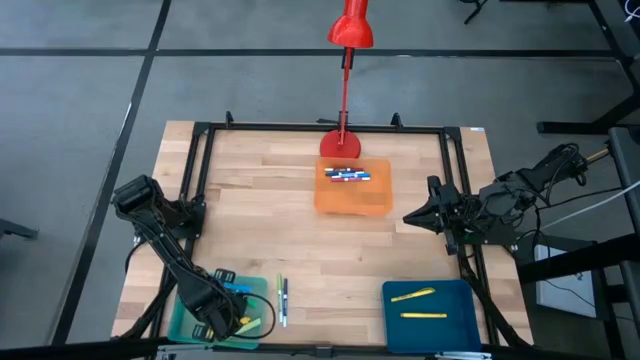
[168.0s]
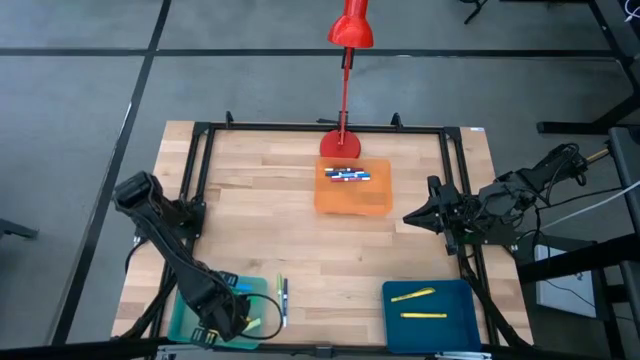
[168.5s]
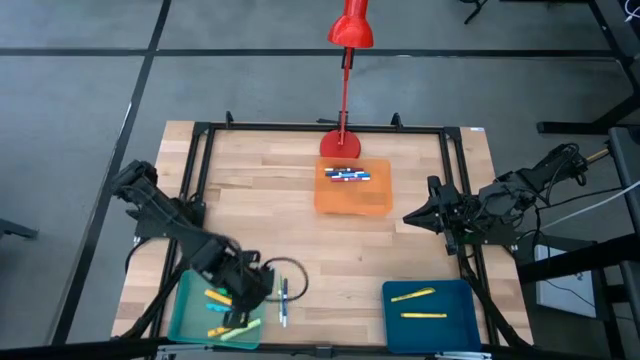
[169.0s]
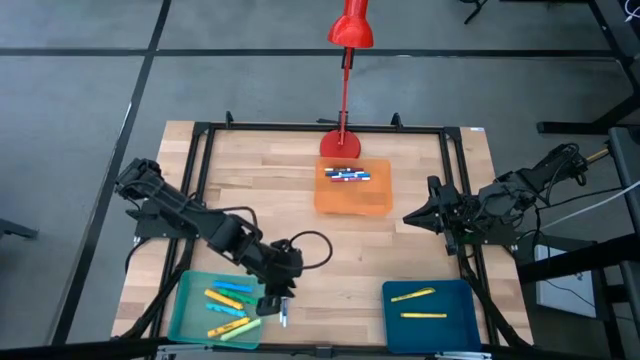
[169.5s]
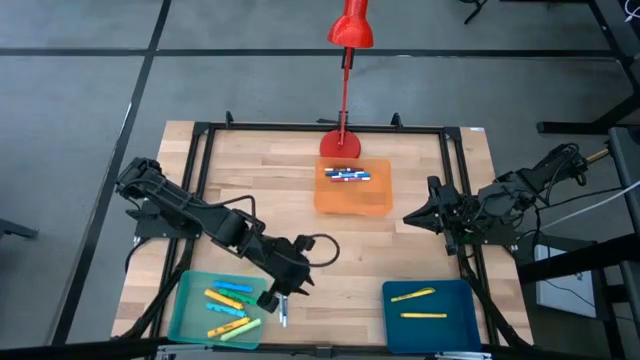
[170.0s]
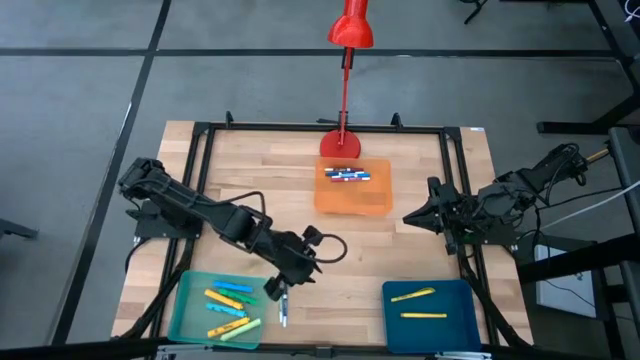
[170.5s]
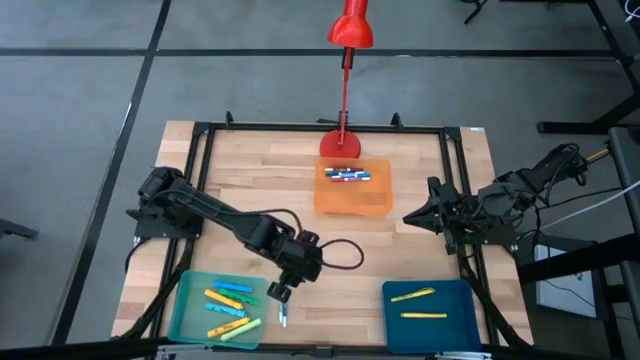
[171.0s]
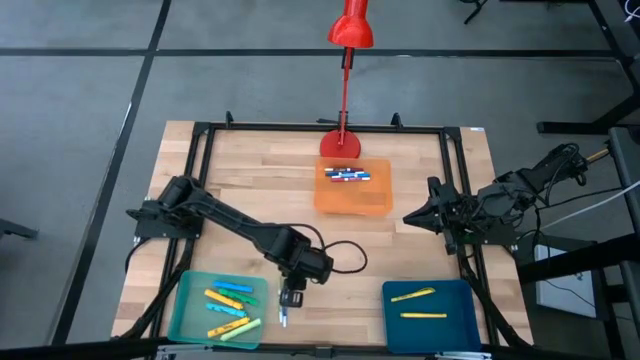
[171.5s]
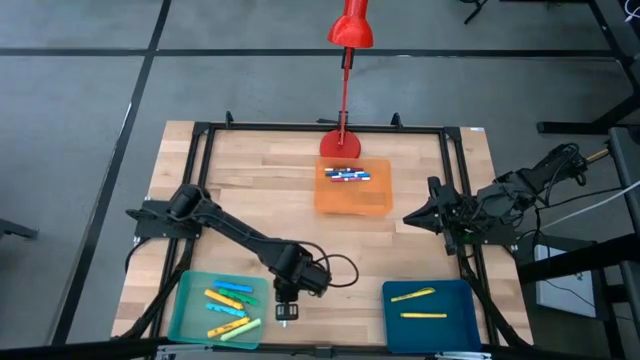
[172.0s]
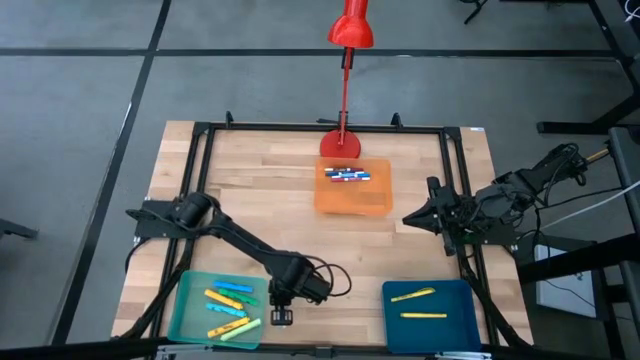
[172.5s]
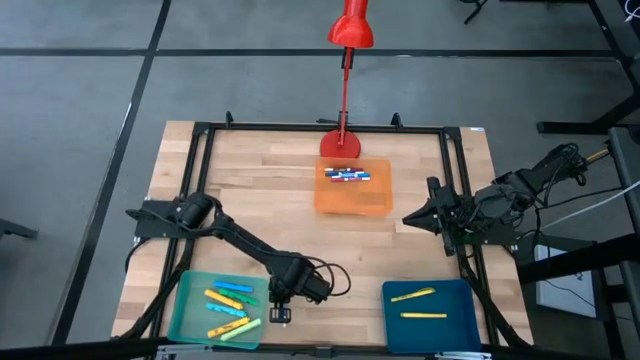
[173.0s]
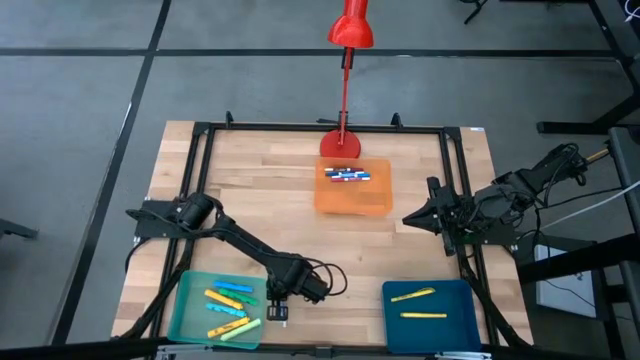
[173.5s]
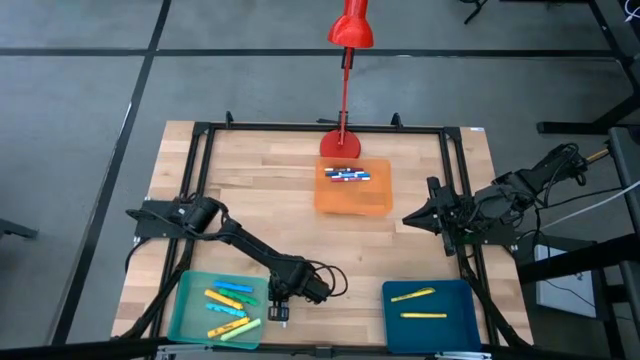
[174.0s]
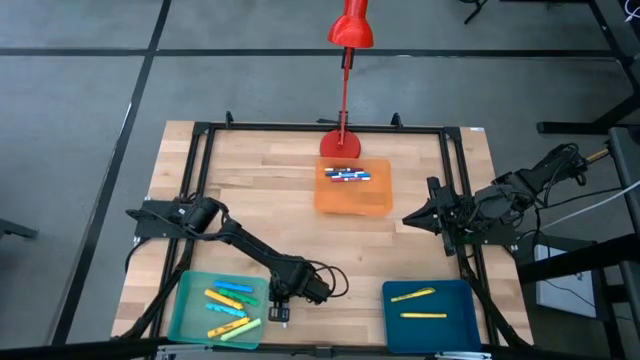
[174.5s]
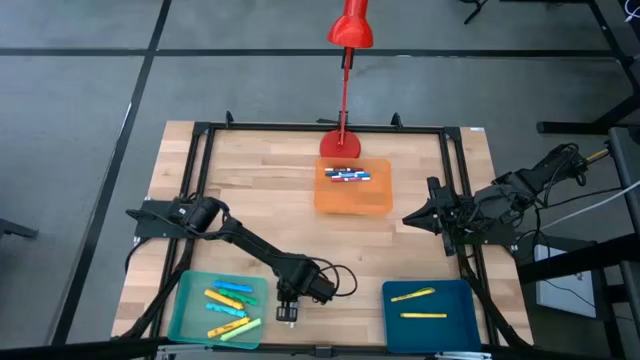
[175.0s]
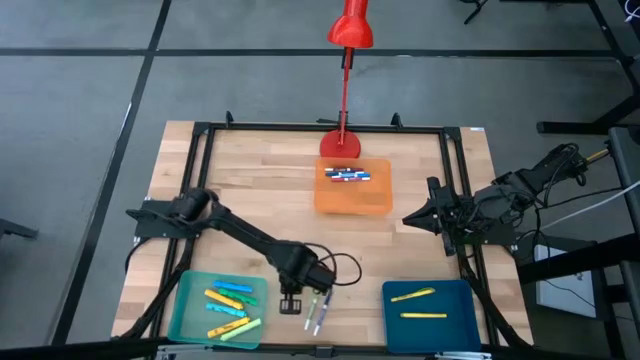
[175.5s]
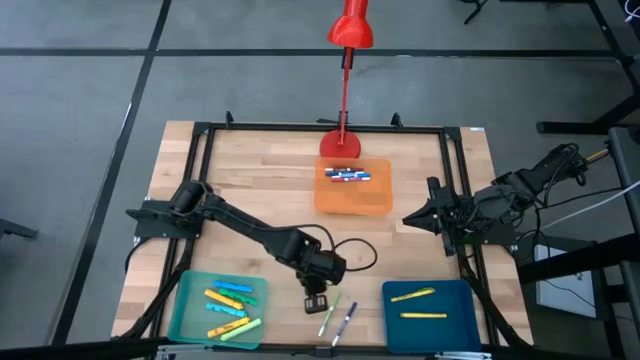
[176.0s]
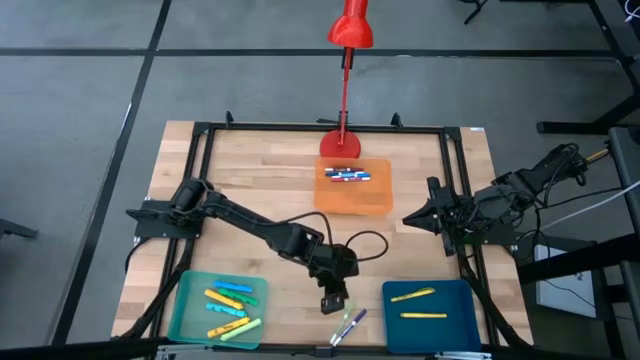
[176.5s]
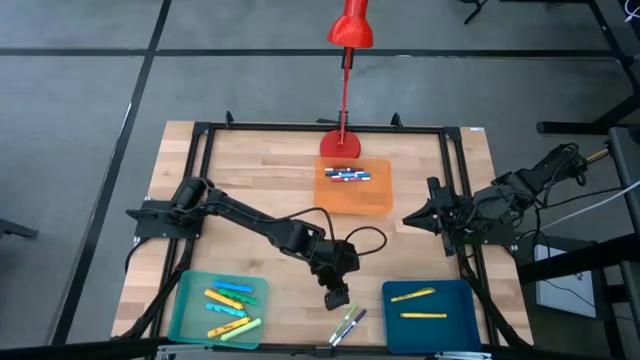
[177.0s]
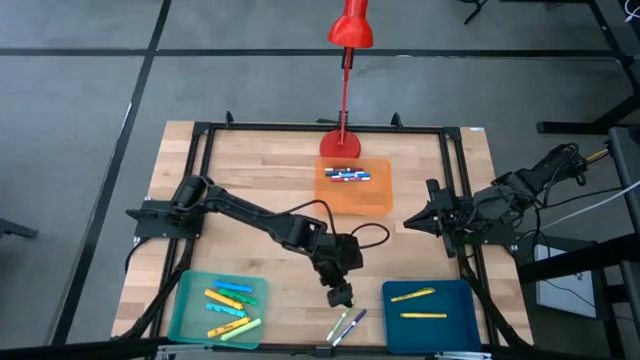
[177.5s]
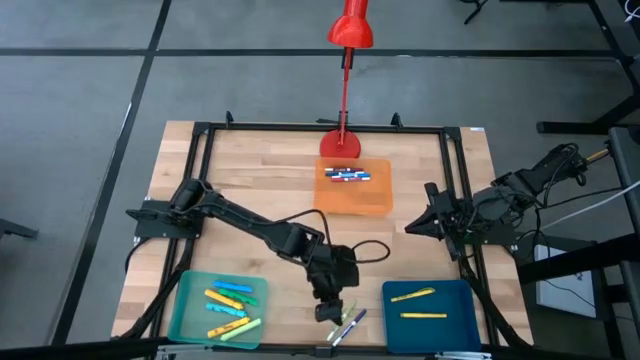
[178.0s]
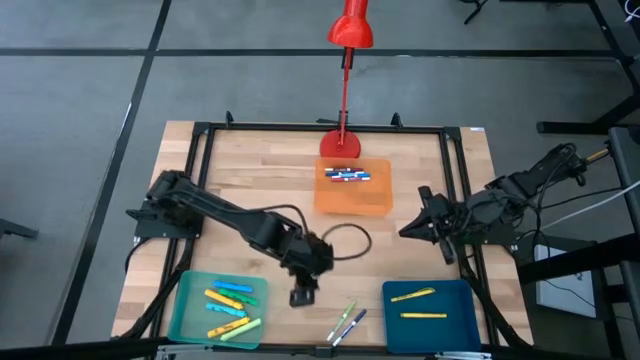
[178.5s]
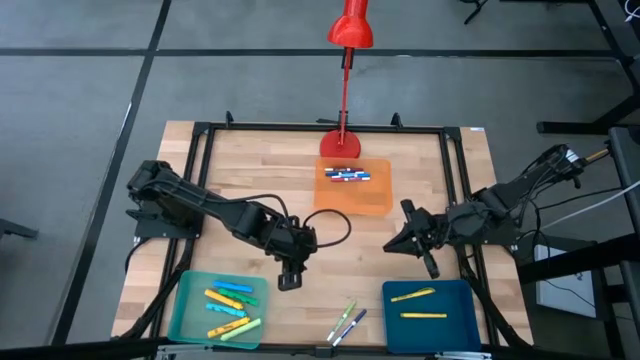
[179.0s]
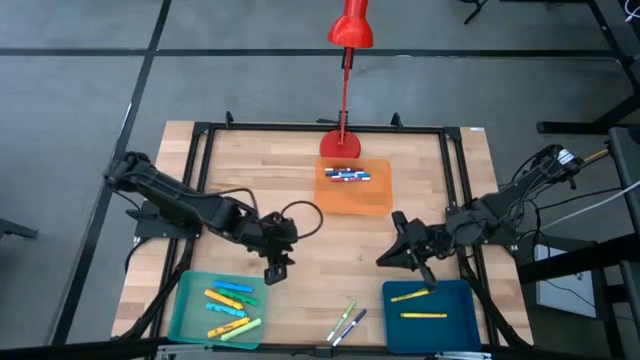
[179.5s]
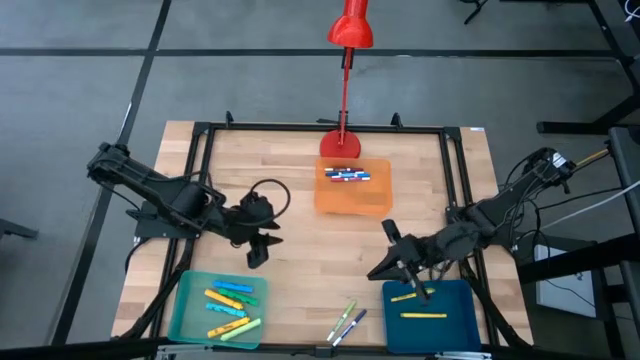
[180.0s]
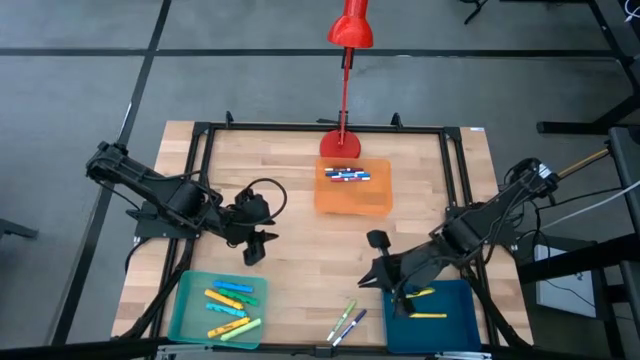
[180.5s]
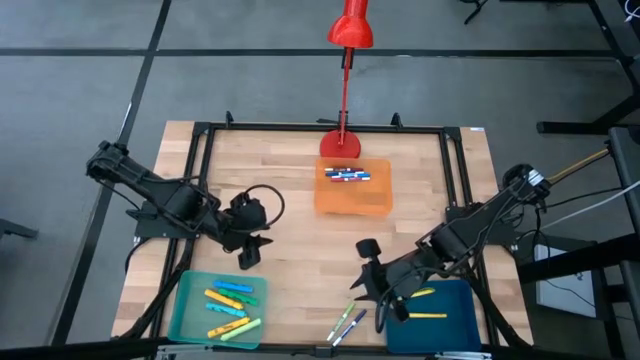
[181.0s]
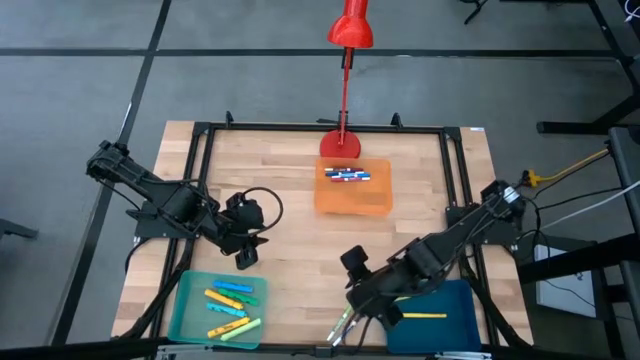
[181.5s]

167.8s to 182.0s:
Task: Pick & Place Markers
Put the green marker pen into the orange bin

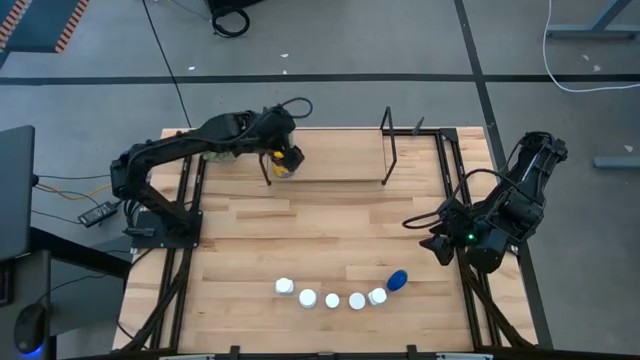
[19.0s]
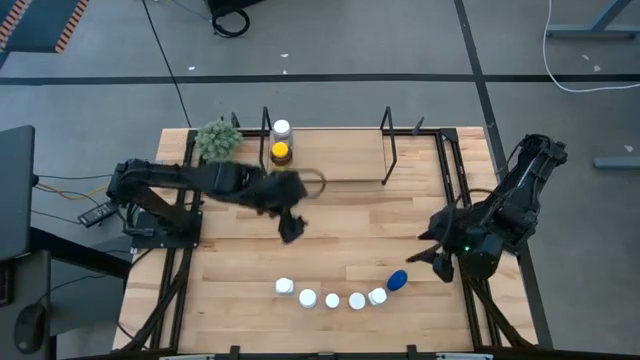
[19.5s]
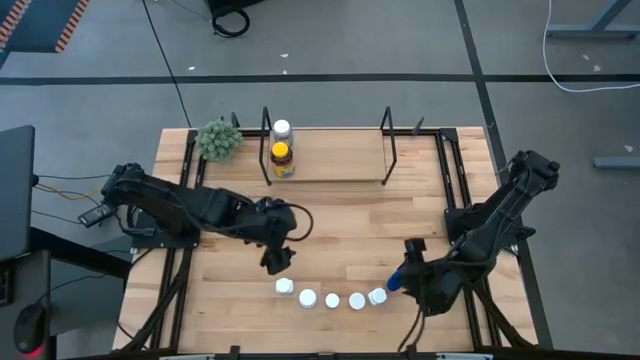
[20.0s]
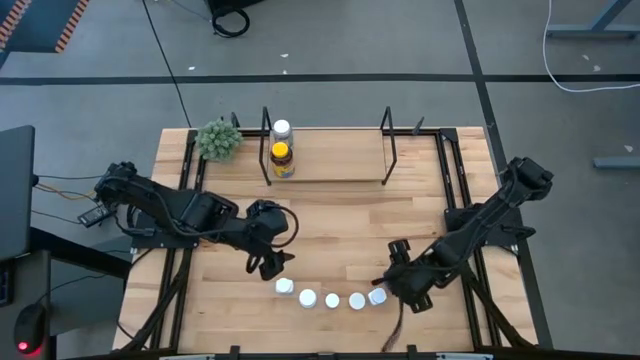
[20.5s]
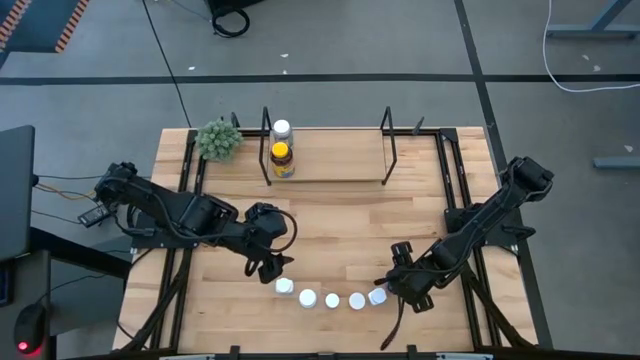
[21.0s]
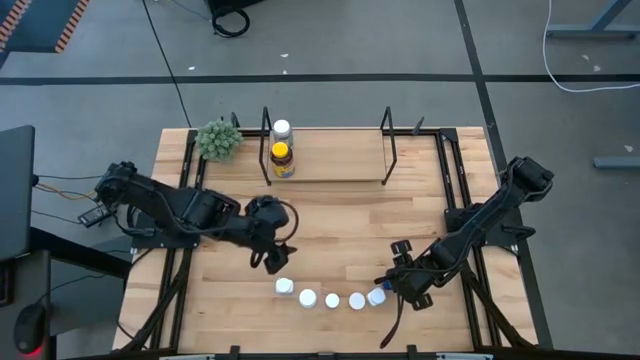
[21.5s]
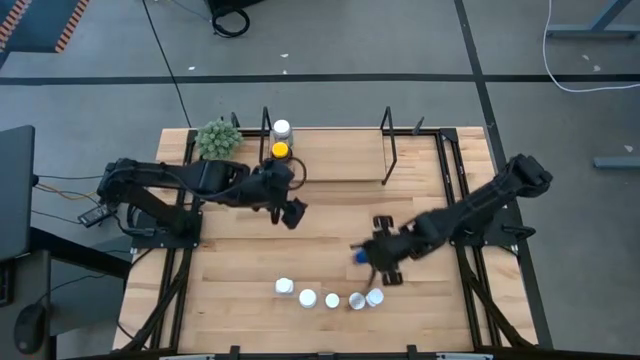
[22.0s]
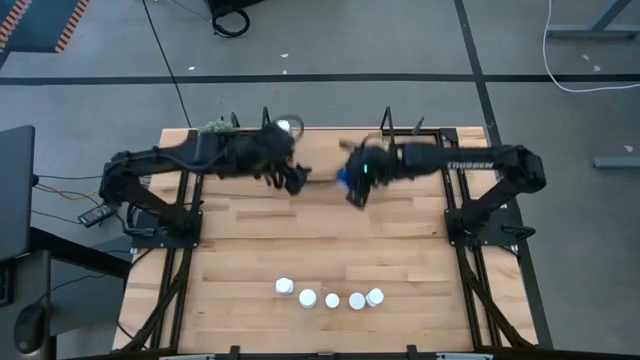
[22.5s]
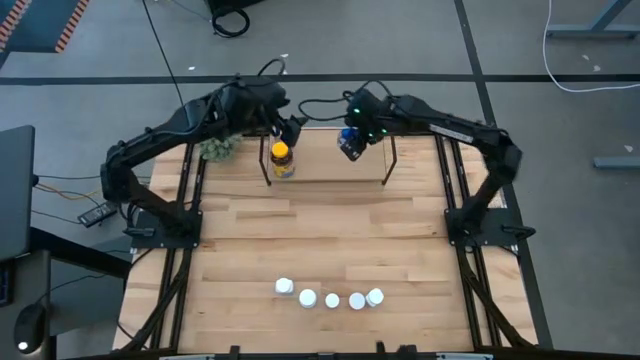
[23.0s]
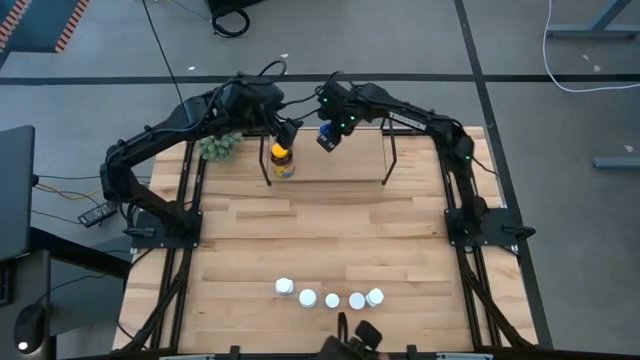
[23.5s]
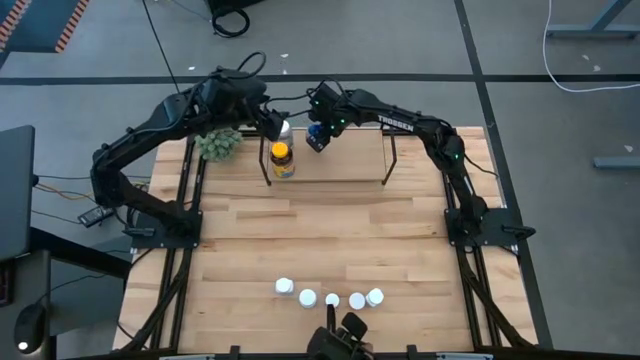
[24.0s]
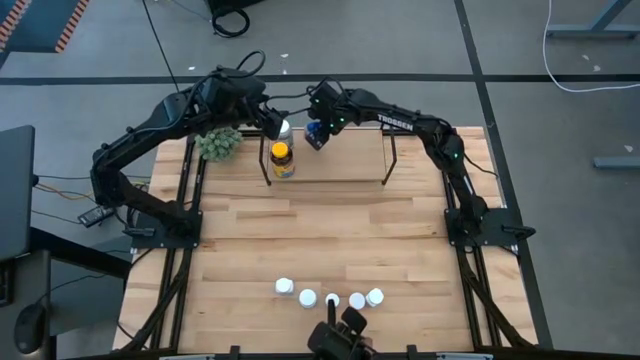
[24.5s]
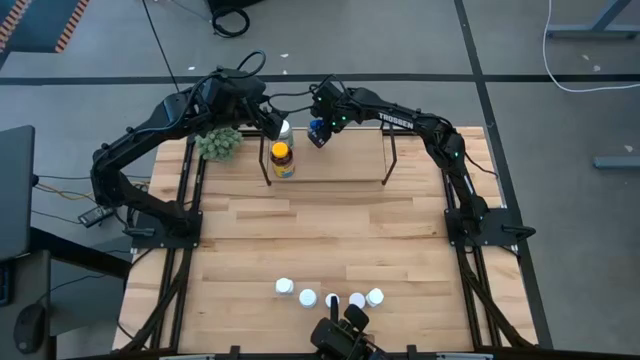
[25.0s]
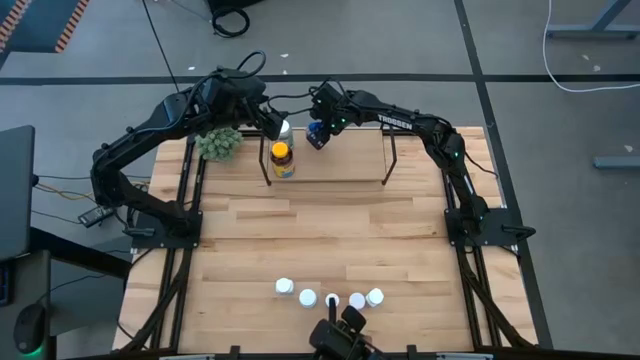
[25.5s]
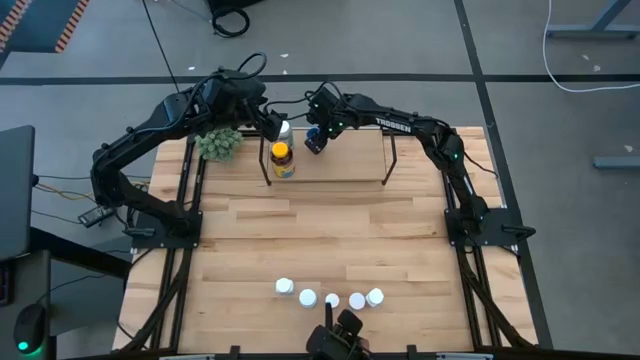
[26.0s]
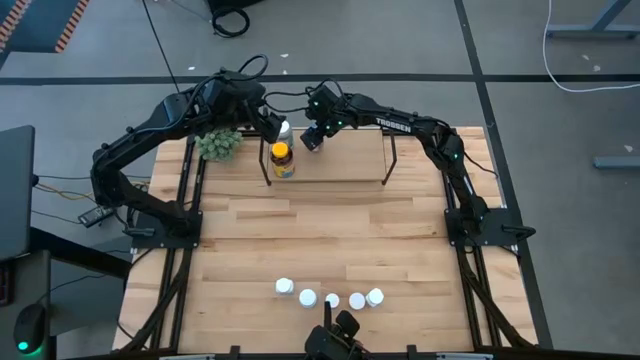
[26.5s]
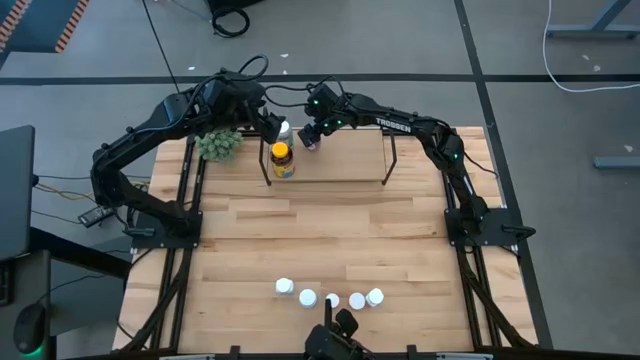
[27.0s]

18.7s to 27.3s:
Task: Pick and place medicine bottles onto shelf by color
Put the blue medicine bottle on the shelf
